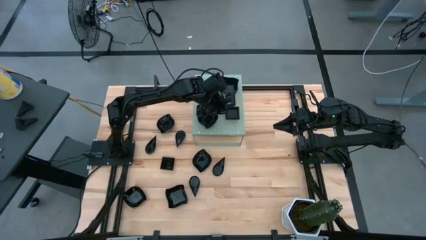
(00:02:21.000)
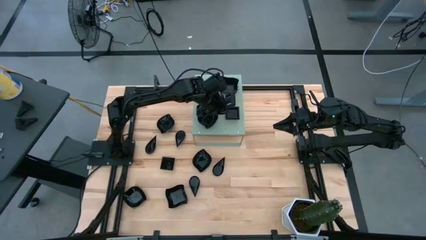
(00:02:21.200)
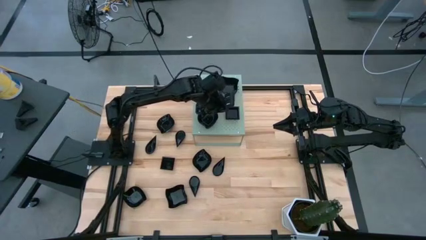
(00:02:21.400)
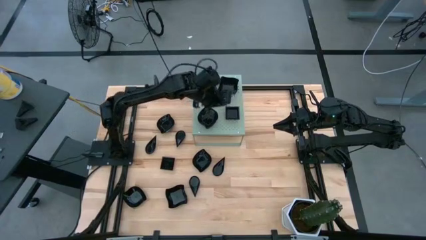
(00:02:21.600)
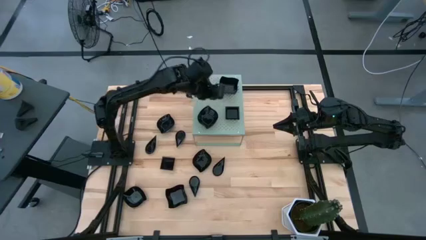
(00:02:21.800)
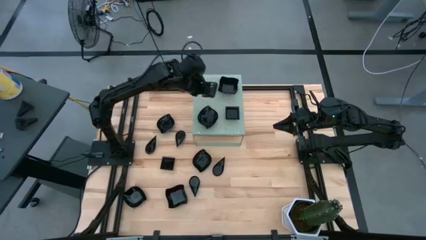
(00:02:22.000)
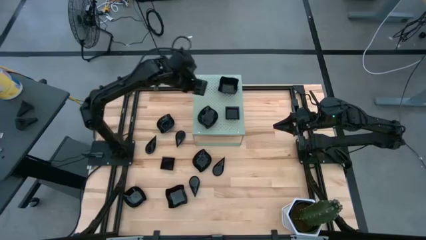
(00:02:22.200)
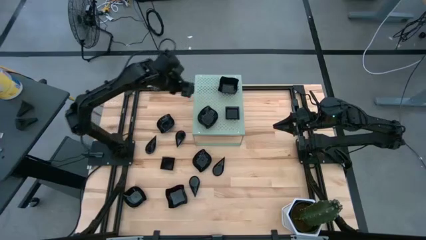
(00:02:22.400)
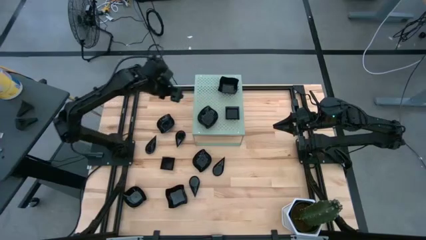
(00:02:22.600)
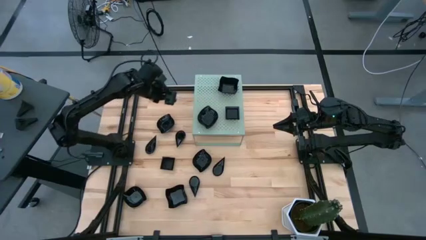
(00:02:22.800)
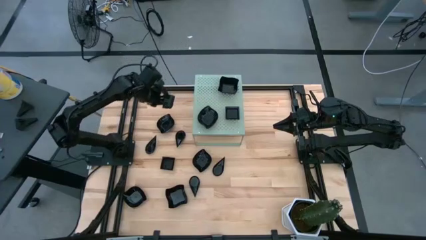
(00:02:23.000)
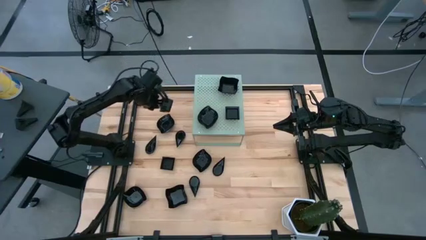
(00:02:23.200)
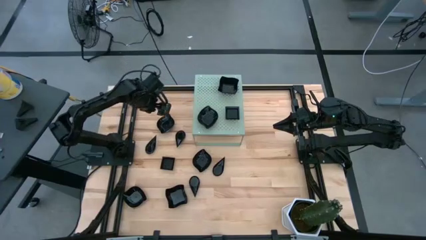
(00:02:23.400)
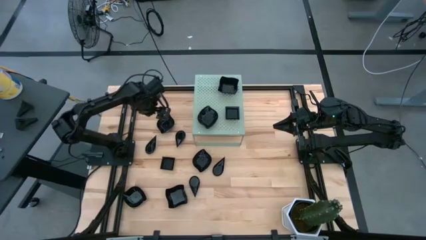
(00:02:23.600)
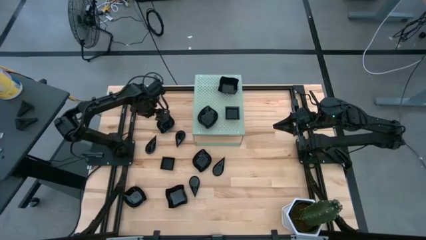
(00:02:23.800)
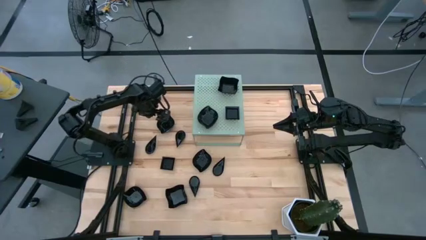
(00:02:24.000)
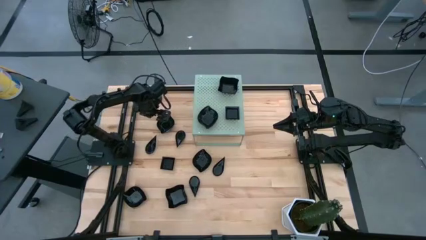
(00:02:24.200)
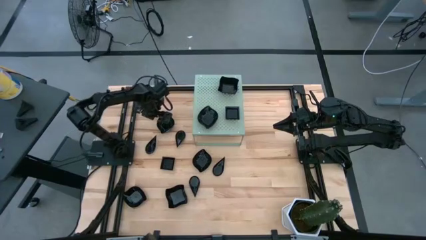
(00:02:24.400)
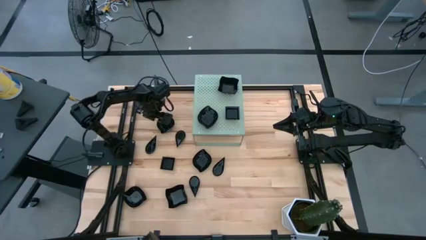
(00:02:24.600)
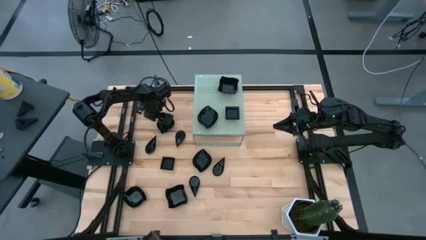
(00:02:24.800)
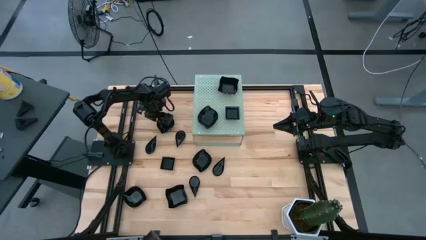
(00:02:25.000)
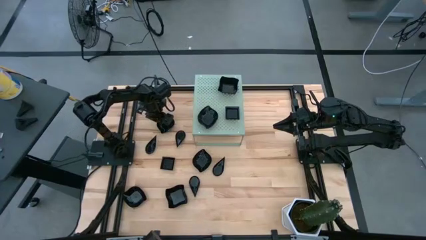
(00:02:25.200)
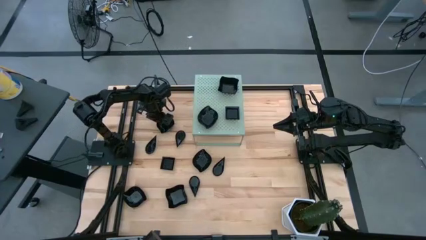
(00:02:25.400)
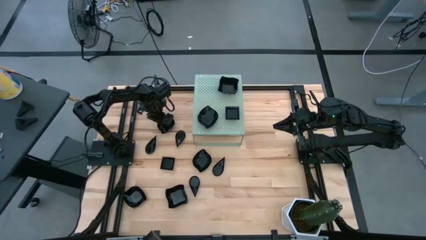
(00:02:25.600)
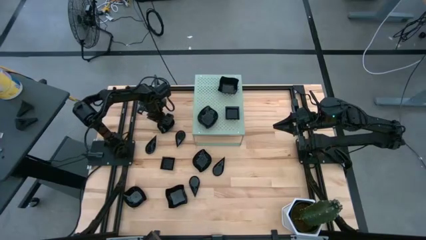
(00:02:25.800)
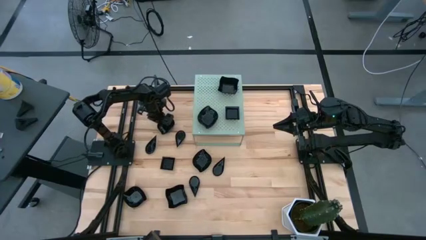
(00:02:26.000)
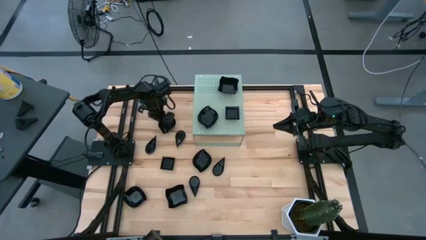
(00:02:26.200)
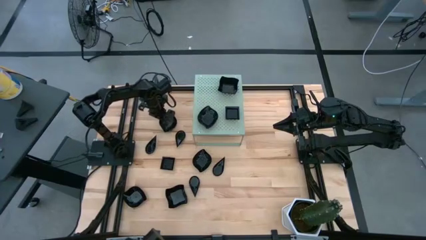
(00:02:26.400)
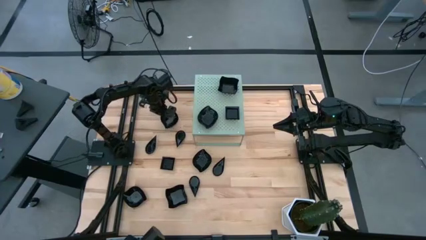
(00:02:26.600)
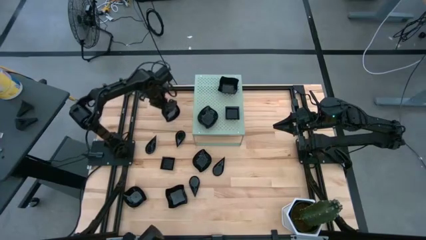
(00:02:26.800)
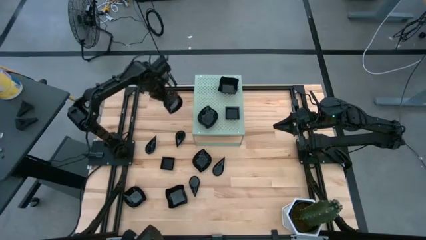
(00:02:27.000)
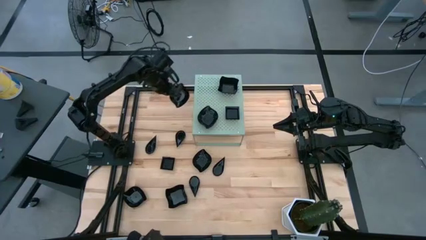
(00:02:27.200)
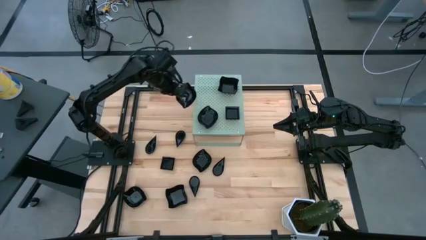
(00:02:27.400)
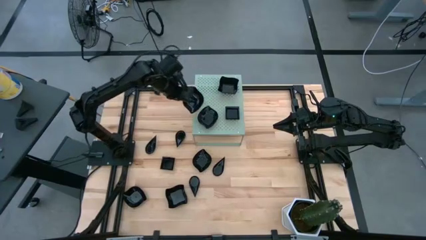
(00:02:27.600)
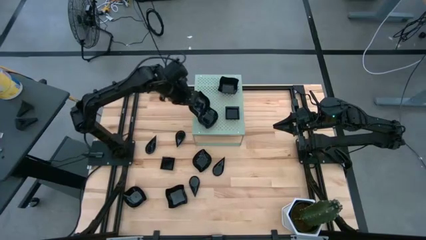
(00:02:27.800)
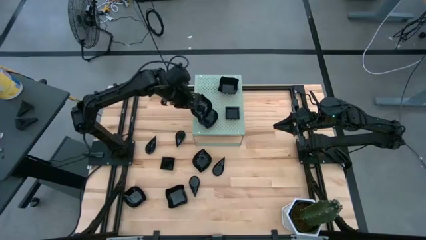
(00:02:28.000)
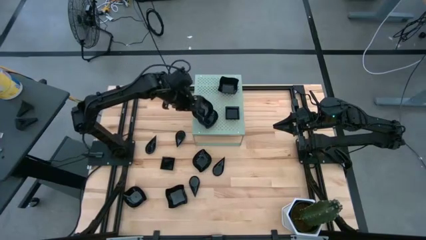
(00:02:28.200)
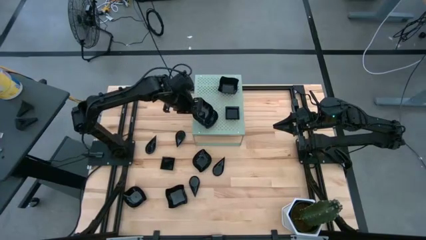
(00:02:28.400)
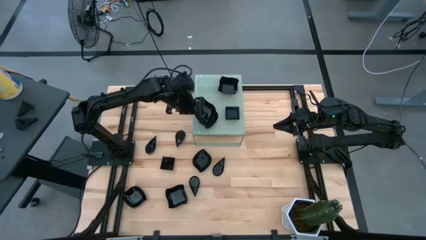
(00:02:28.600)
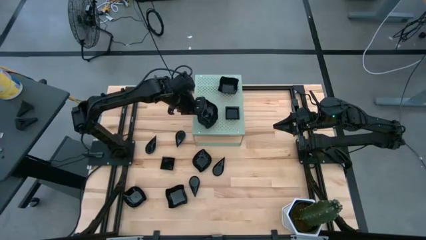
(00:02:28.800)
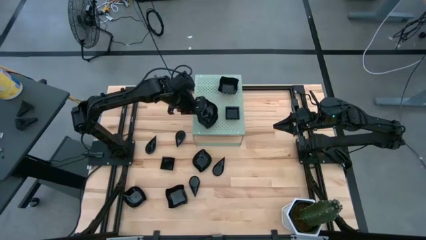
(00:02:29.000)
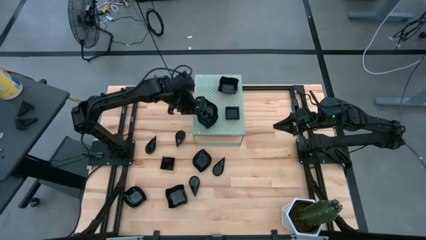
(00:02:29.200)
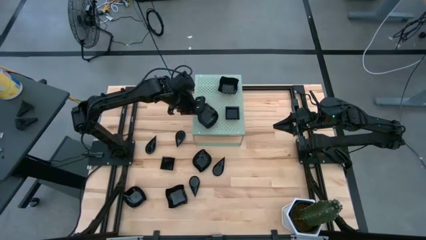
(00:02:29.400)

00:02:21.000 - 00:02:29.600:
Task: Pick & Place Mini shaped plates
Stack the leaf shaped plate on top of the leaf shaped plates on the shelf

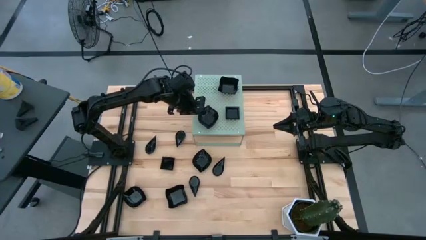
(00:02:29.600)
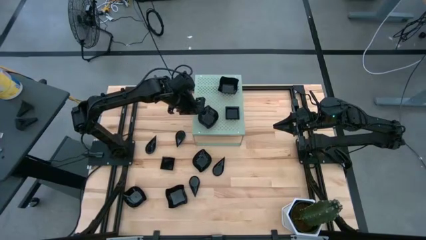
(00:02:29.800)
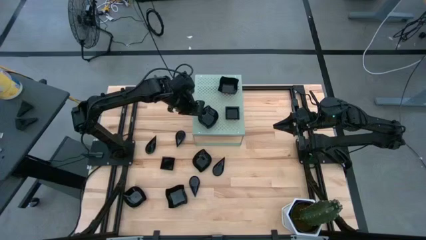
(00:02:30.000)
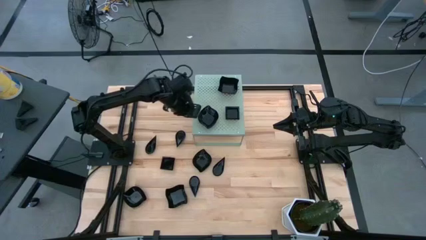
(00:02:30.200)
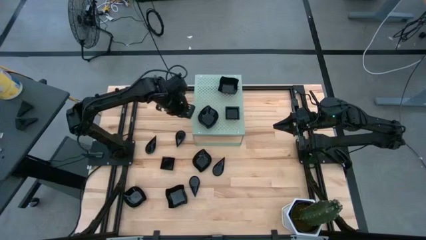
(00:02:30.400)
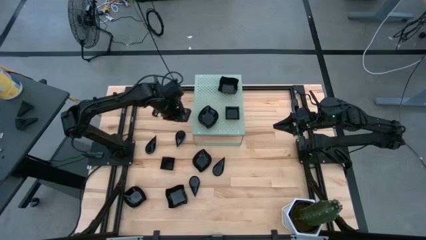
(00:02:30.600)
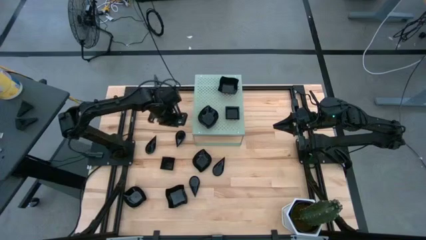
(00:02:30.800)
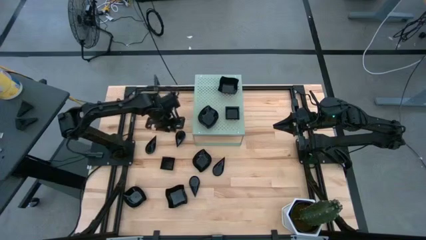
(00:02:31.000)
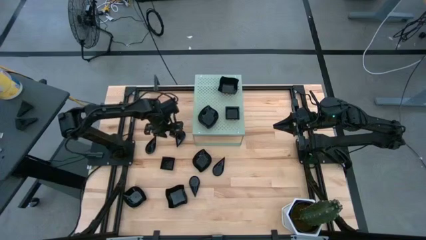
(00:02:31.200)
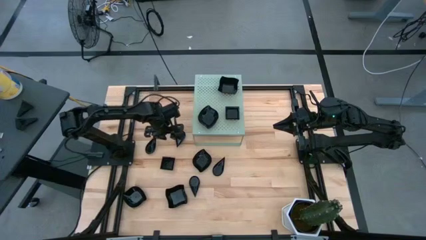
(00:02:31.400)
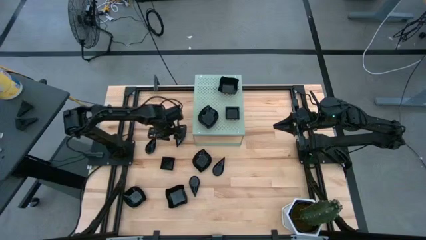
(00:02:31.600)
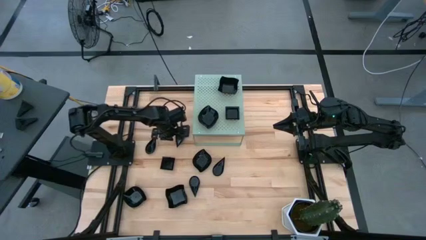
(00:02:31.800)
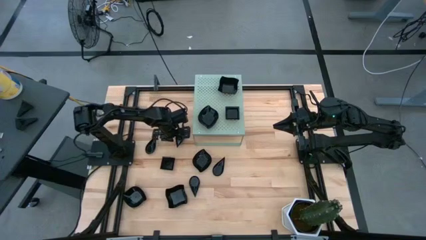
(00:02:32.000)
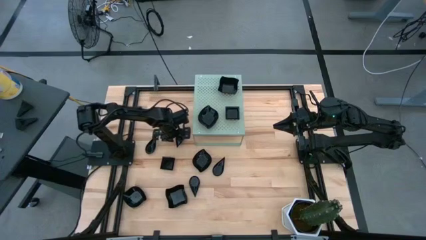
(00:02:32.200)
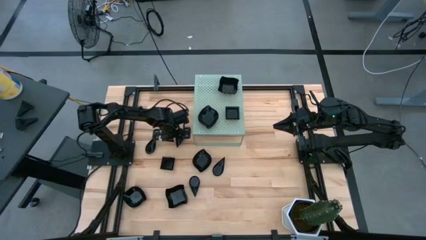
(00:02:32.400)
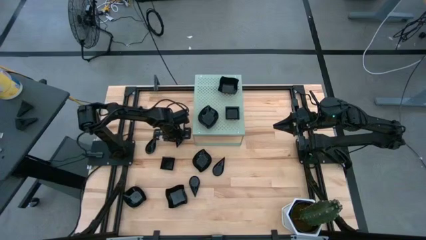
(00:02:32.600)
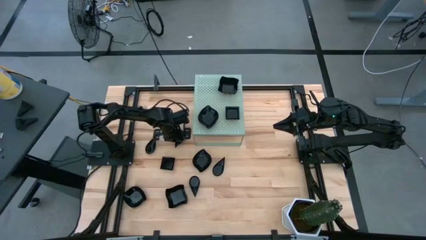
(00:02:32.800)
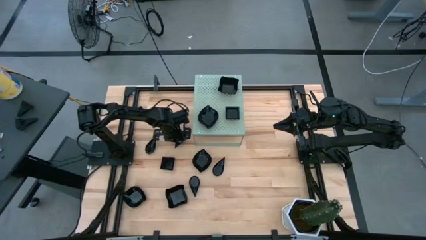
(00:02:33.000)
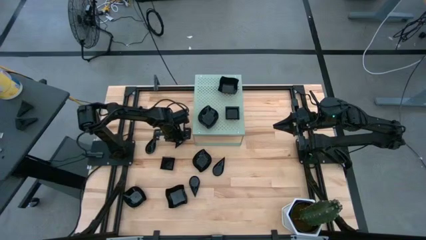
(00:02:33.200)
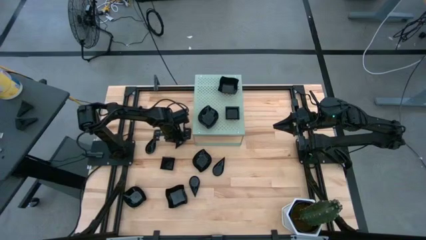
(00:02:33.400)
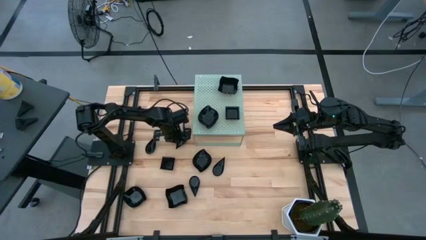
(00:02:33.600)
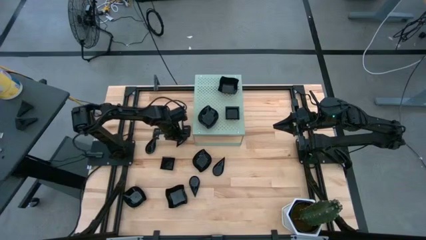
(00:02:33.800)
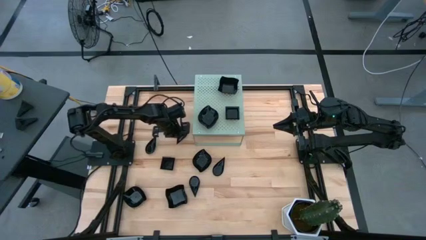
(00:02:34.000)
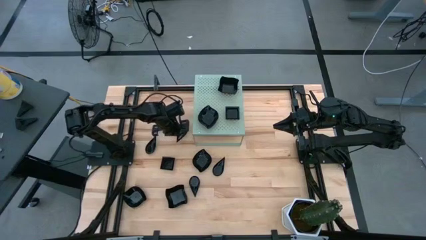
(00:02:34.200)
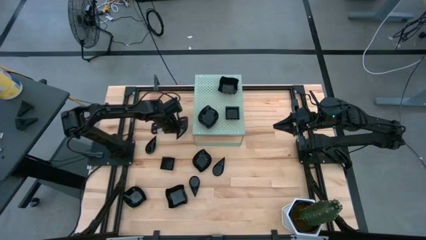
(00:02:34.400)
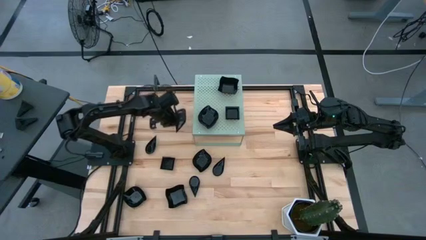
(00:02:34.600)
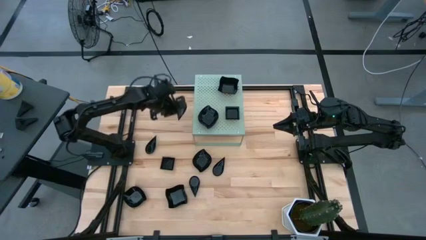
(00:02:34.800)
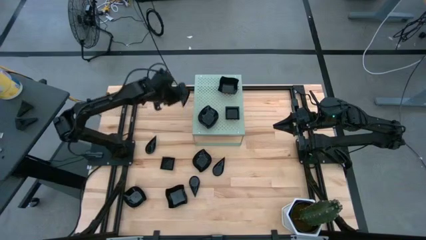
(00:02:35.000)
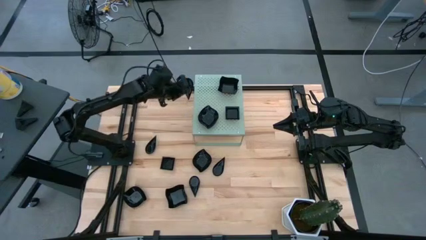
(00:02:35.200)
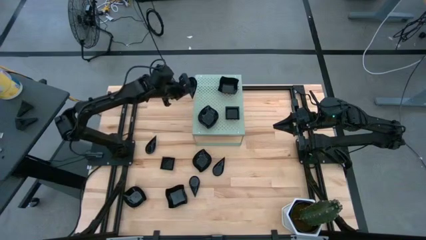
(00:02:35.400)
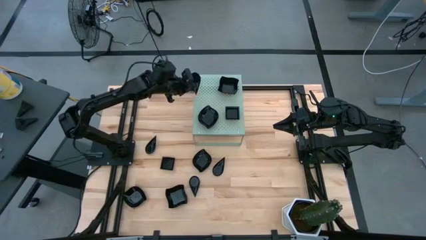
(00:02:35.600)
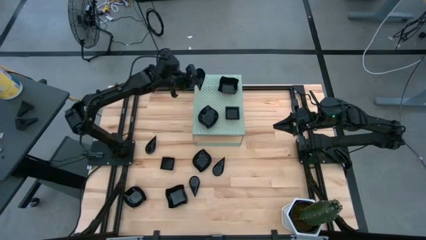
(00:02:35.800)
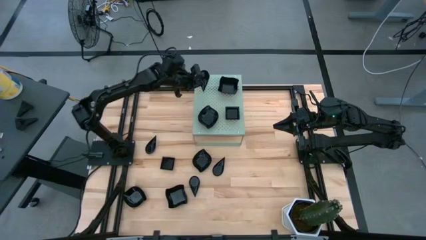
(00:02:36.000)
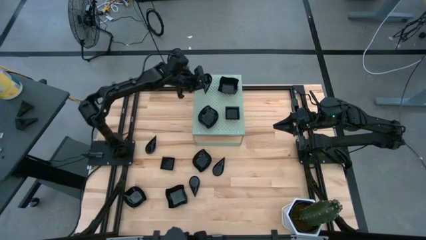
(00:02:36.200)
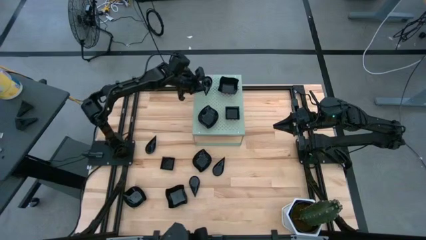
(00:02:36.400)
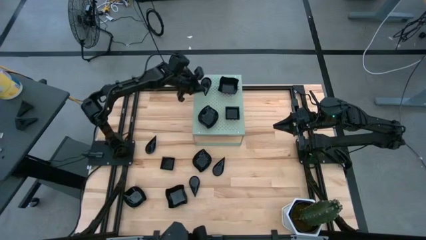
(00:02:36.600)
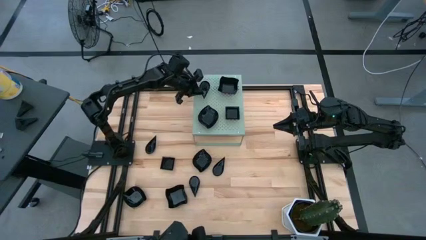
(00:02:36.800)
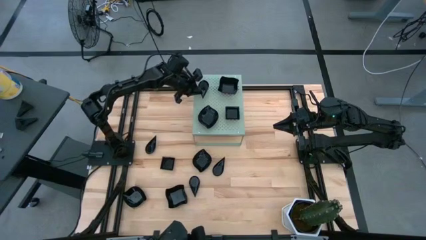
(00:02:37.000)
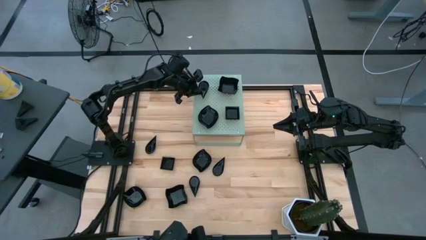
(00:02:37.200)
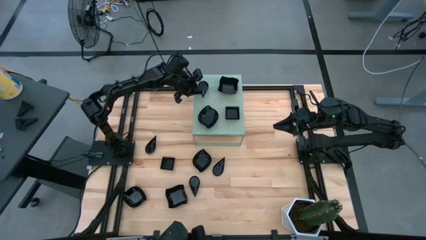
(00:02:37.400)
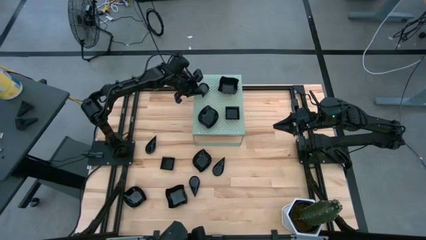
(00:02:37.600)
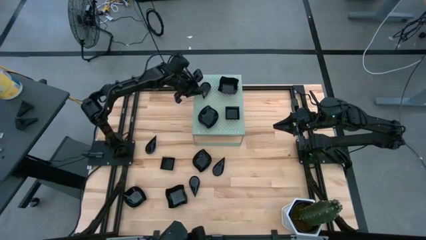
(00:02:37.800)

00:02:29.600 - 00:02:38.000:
Put the drop shaped plate on the shelf
